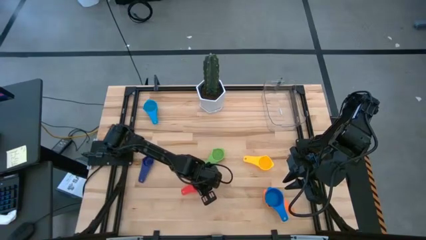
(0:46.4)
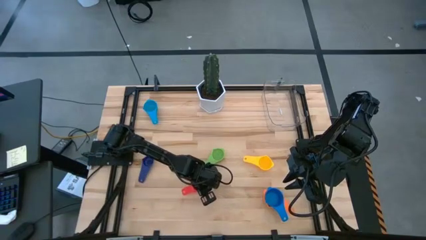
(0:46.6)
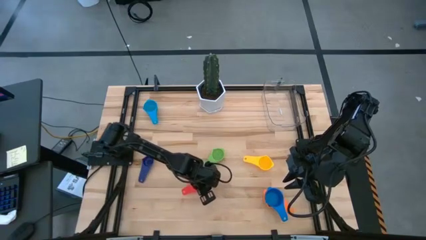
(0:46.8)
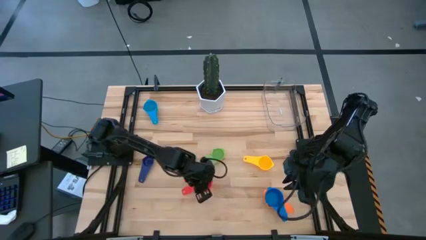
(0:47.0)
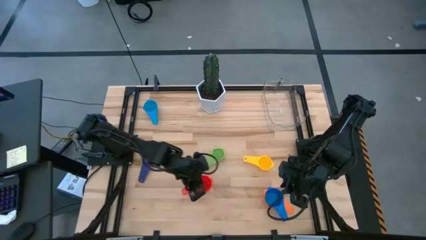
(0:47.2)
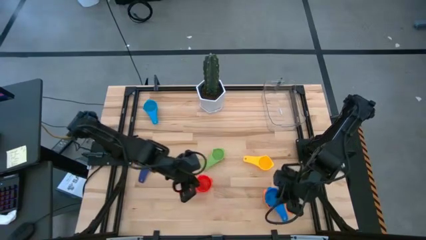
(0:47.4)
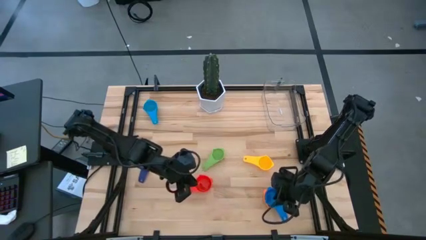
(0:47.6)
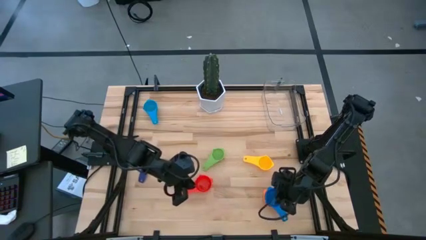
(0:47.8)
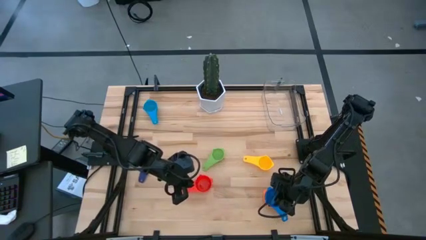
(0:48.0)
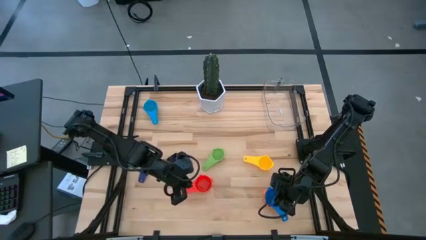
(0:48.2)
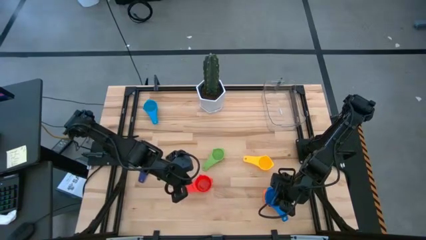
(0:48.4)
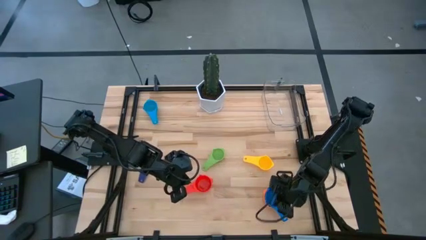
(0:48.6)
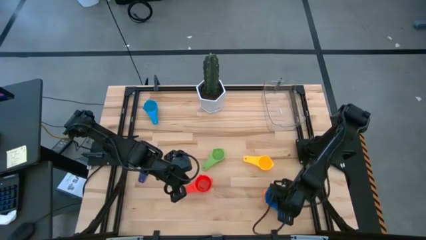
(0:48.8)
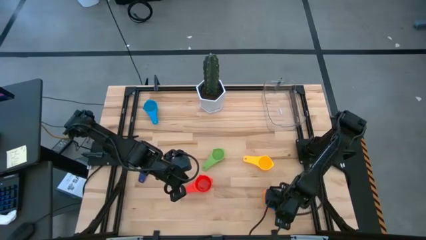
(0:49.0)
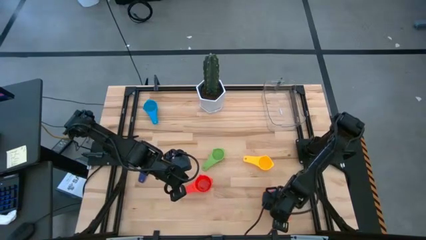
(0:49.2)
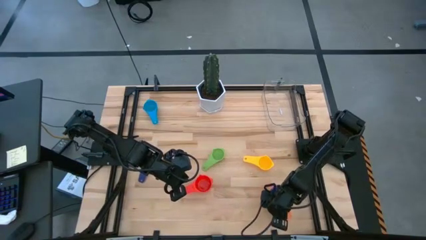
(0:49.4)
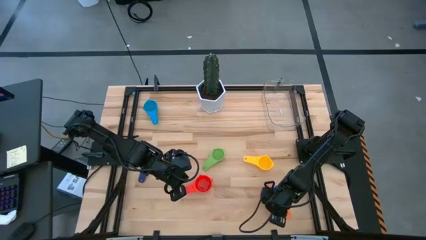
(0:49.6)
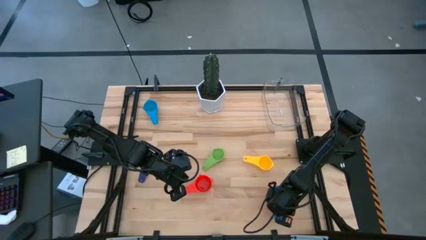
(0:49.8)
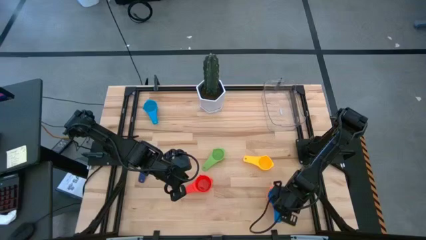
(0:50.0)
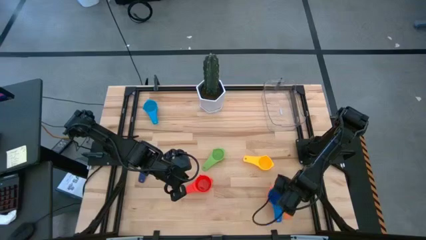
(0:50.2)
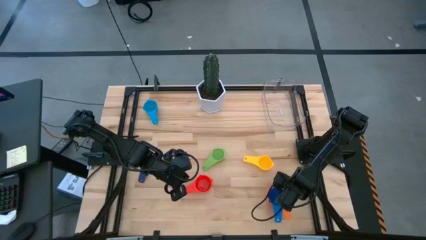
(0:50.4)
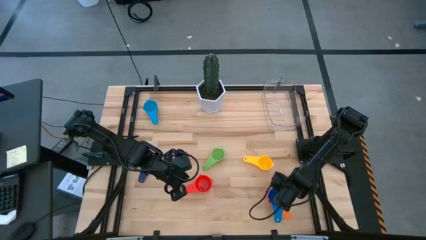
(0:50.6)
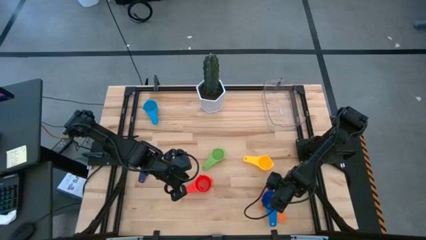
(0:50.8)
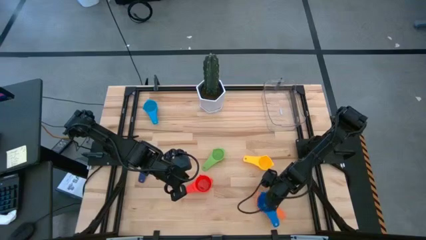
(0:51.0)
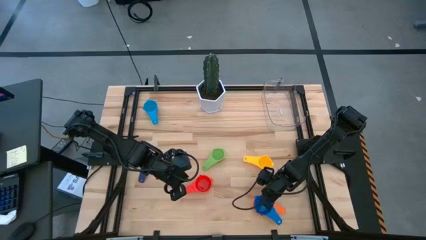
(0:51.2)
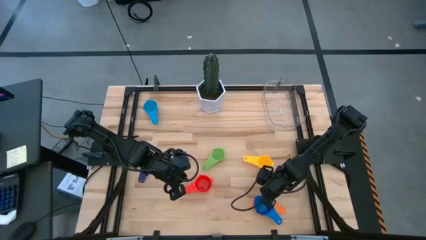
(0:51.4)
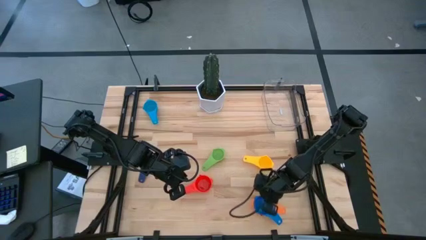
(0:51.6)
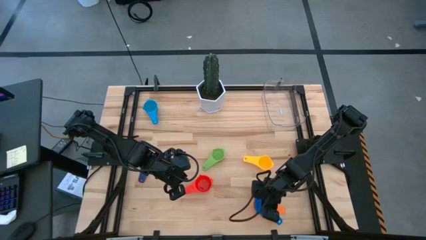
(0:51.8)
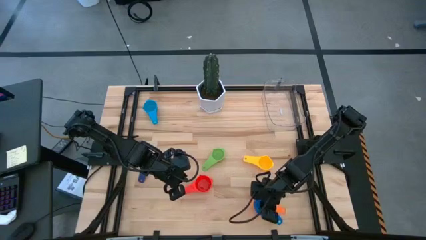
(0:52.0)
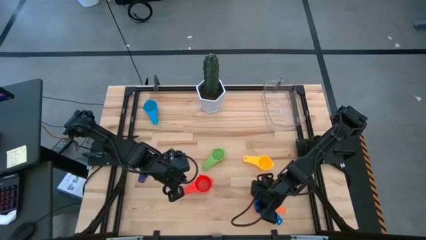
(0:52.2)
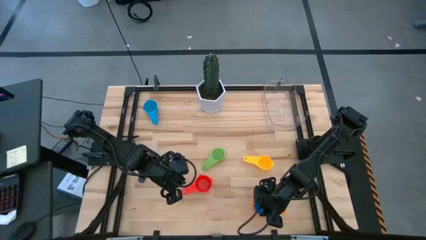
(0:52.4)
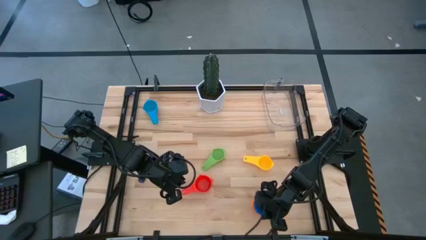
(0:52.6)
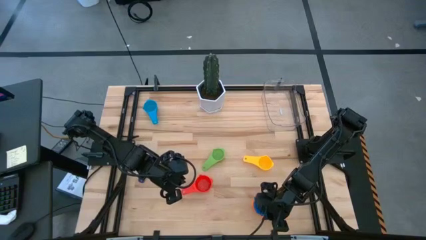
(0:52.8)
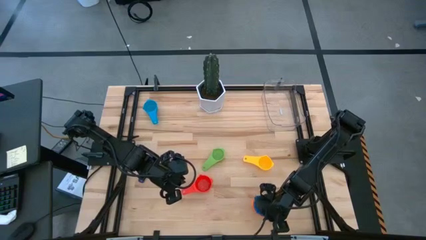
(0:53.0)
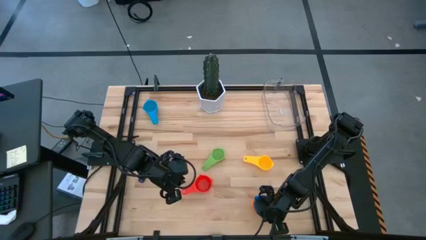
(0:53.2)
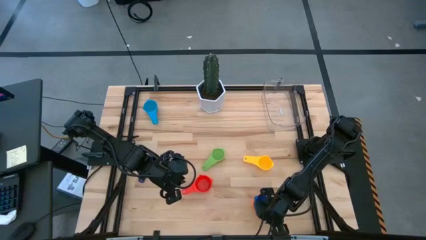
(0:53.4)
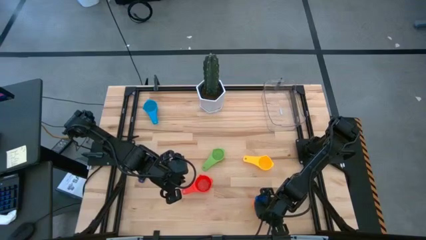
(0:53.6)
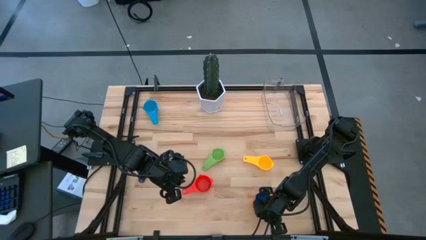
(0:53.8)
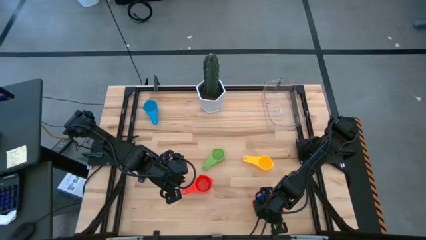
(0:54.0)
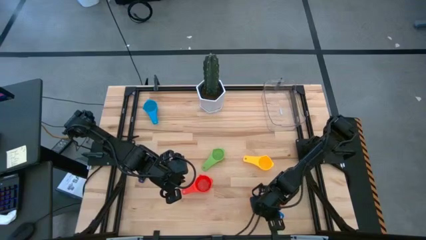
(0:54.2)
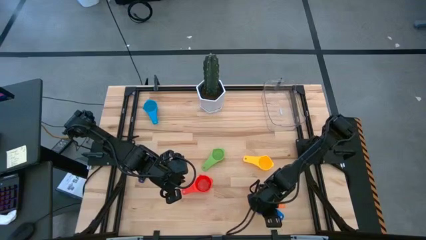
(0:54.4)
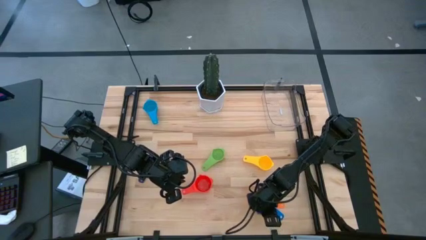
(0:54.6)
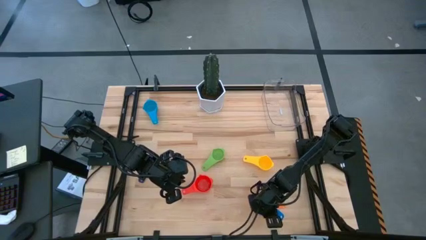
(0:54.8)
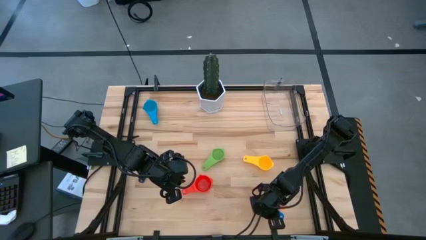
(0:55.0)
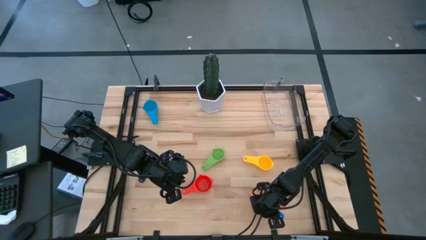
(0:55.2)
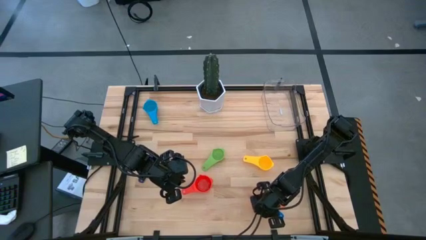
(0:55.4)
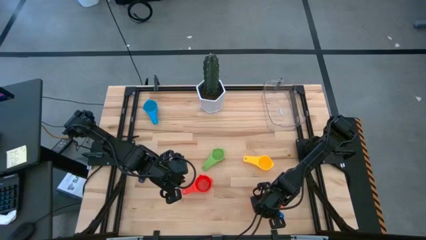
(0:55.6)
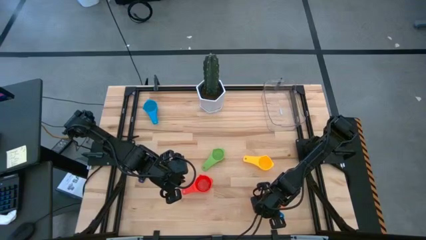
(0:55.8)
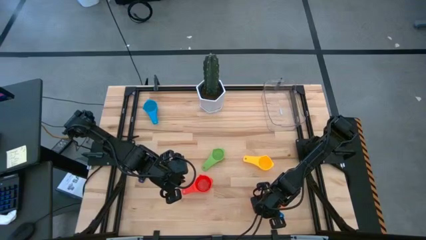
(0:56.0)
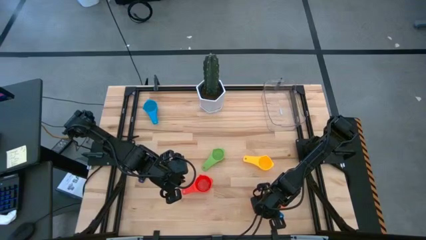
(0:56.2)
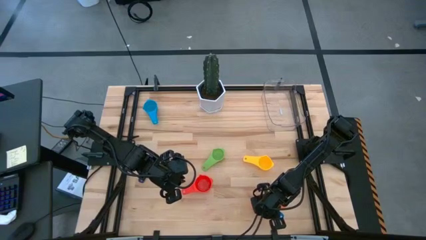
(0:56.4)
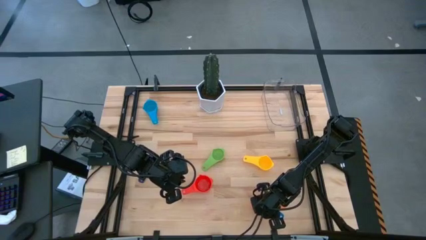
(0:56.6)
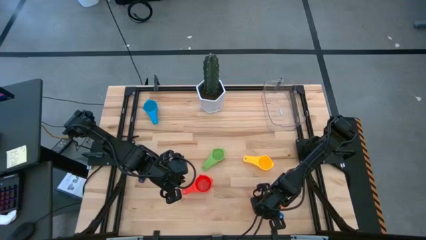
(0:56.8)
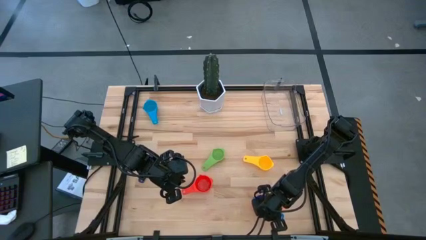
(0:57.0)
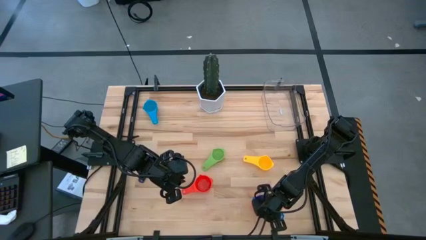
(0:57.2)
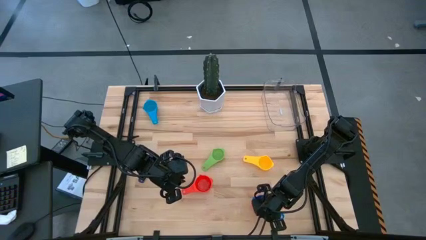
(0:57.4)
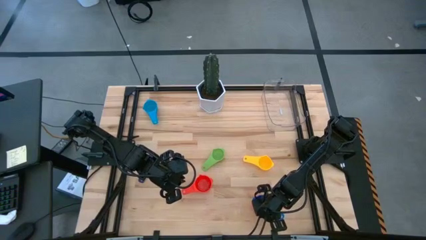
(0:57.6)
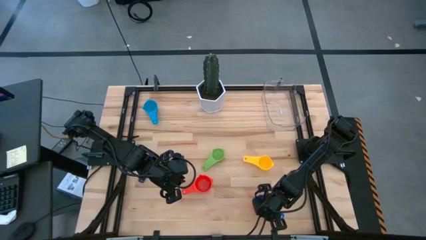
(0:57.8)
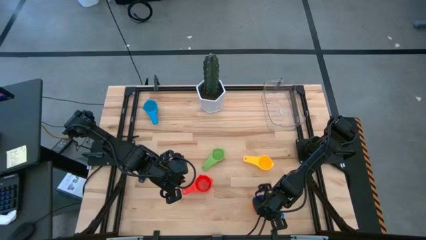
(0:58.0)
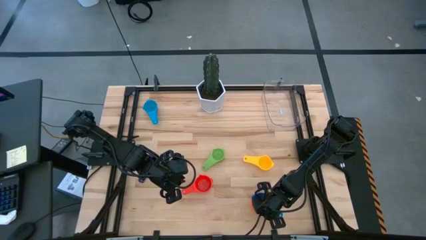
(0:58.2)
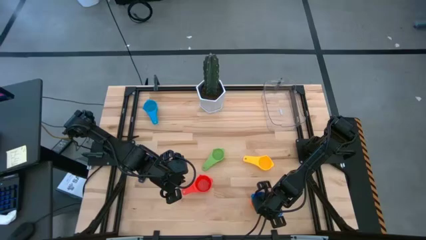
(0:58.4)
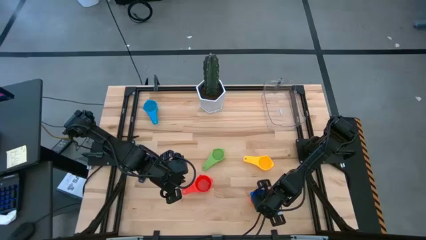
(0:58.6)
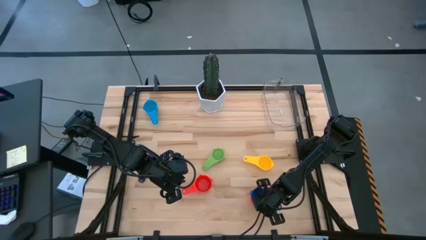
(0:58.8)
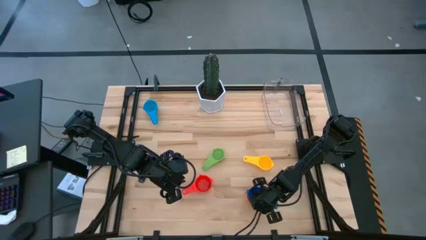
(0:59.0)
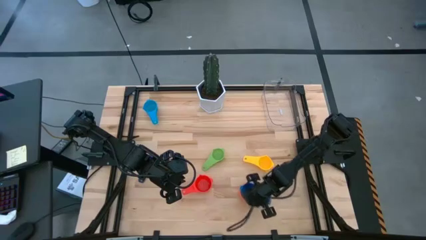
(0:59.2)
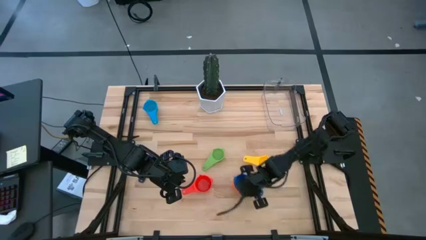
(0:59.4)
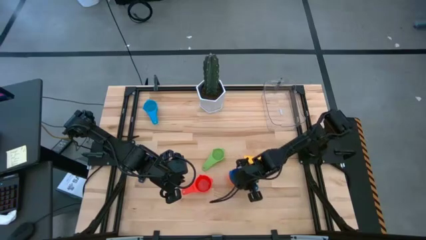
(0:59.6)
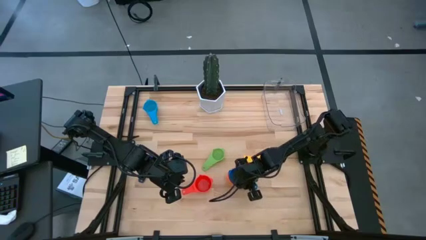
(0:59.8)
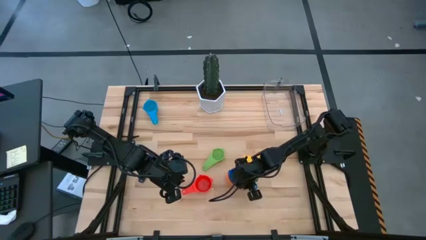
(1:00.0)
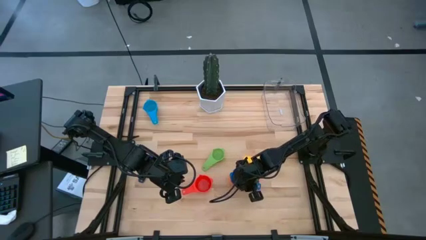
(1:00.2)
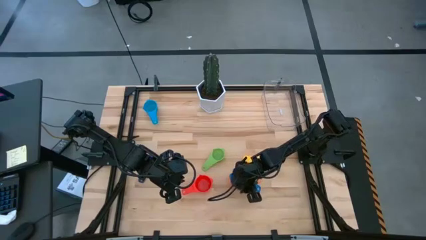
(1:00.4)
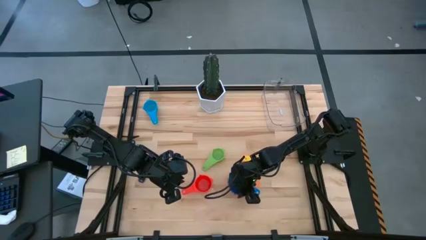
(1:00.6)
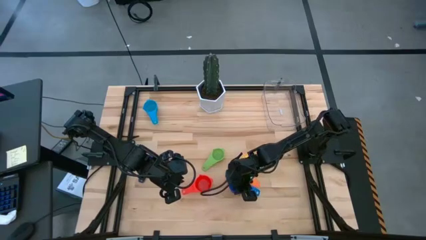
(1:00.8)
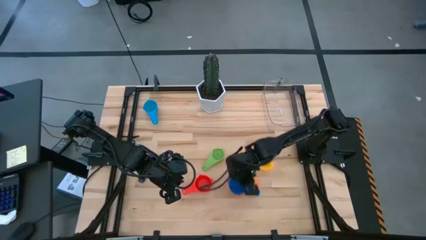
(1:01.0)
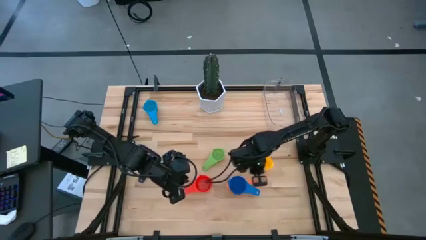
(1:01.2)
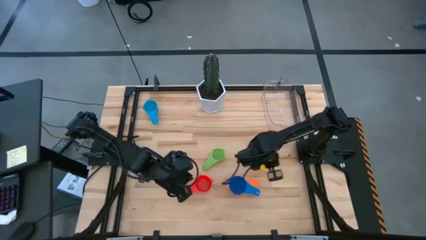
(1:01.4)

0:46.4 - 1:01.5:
Task: Nest measuring cups in basket
Adjust the stacked measuring cups

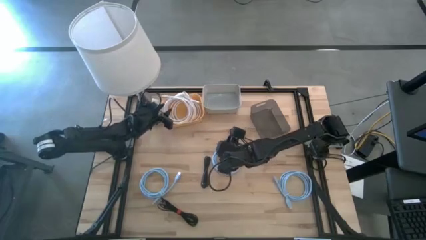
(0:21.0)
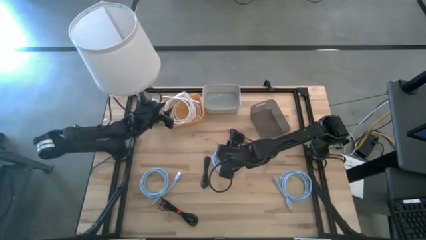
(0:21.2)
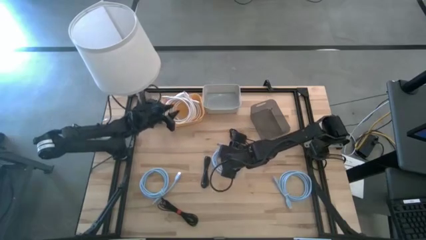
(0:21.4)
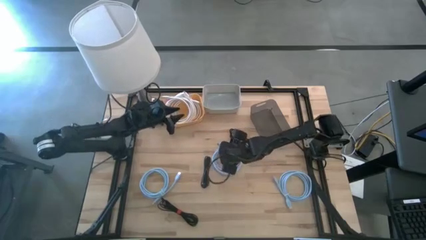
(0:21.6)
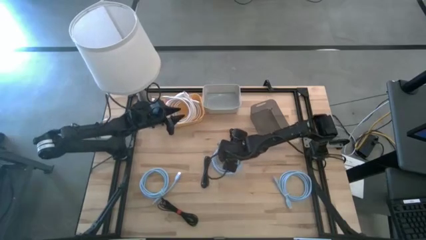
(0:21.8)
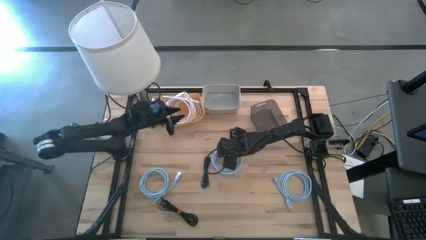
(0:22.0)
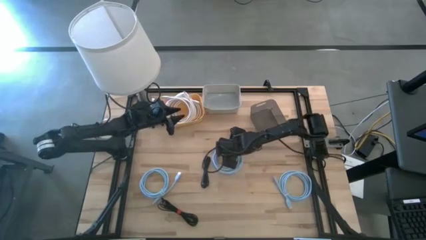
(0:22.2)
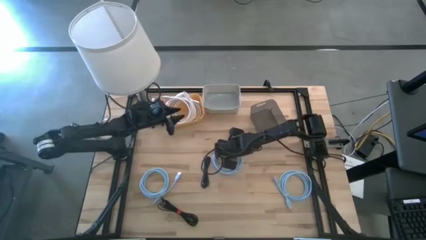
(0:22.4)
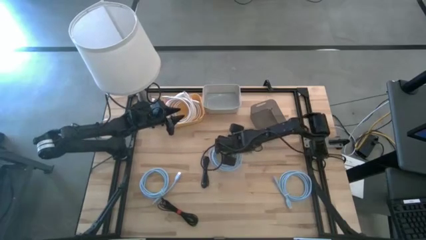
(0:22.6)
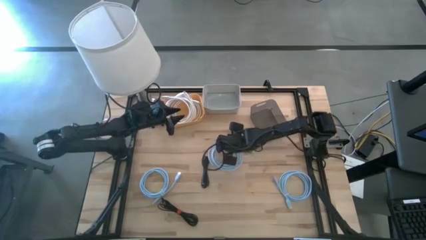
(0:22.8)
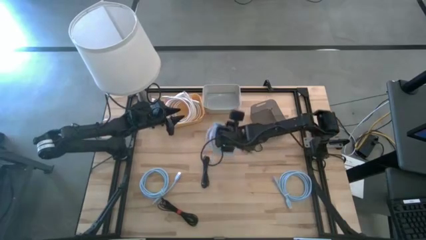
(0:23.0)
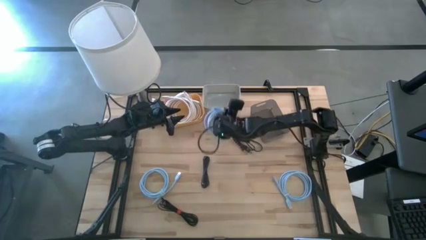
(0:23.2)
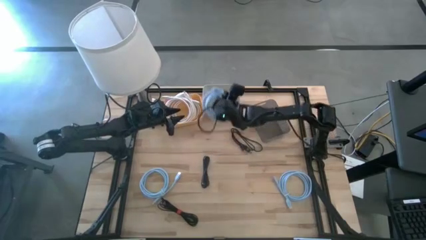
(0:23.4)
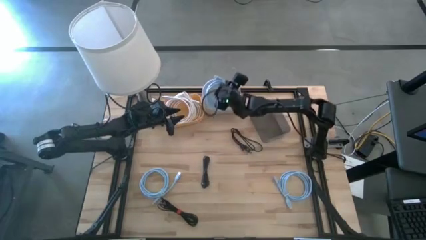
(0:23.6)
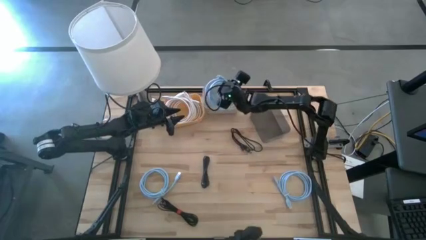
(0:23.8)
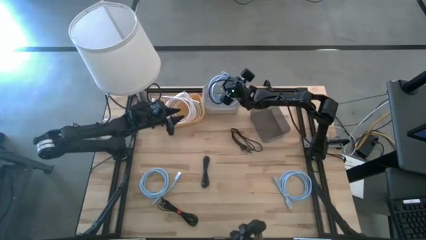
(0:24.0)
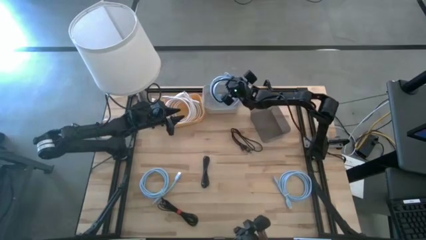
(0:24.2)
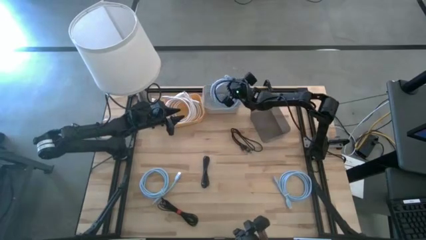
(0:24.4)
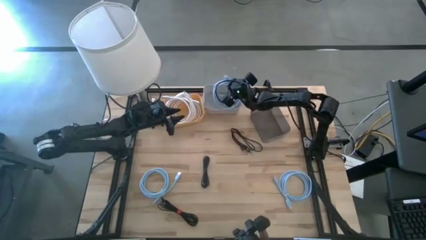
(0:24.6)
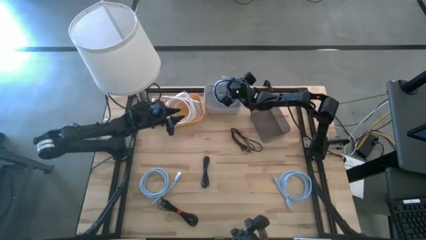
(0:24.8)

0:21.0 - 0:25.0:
Task: Pick & Place USB Port
Put the top blue display cable into the gray bin
